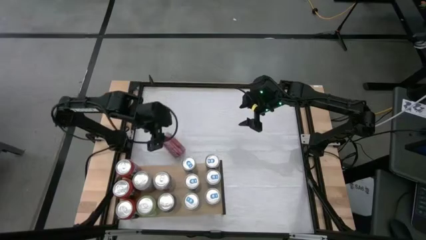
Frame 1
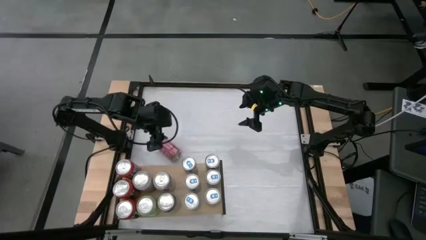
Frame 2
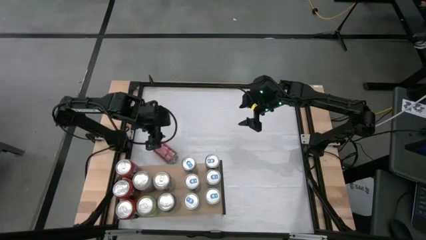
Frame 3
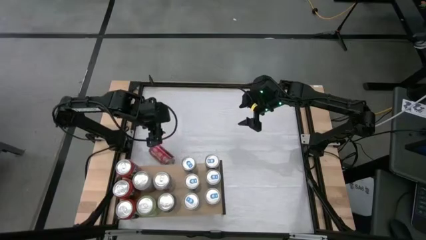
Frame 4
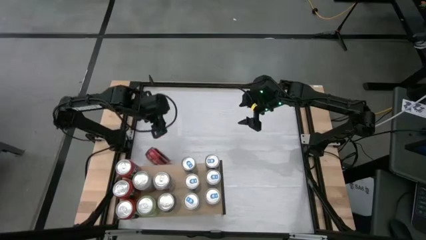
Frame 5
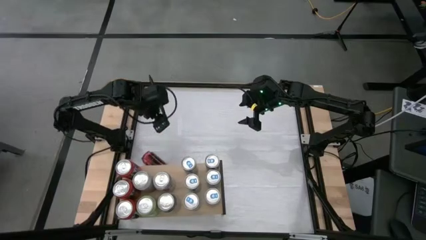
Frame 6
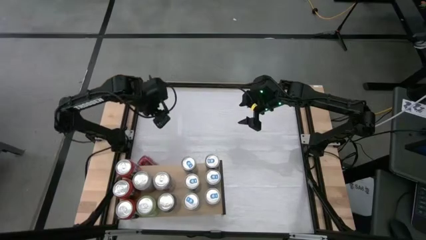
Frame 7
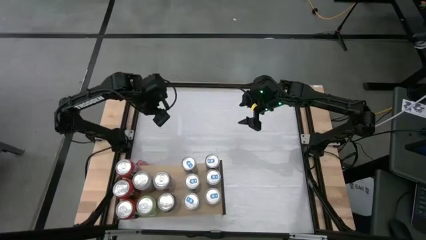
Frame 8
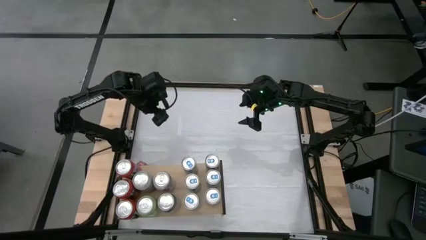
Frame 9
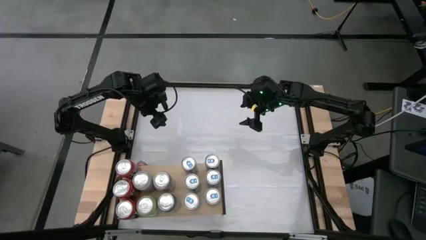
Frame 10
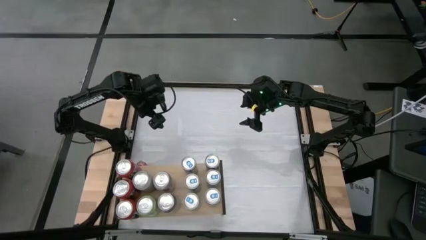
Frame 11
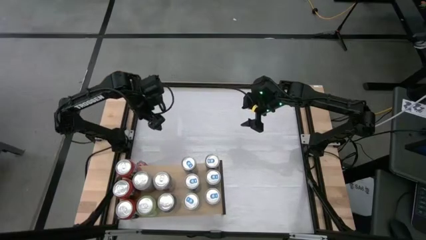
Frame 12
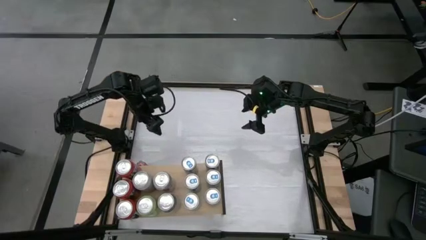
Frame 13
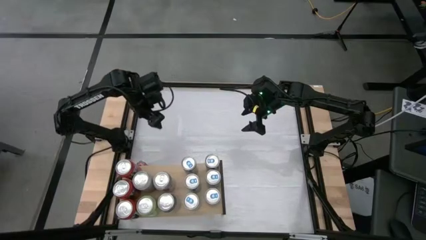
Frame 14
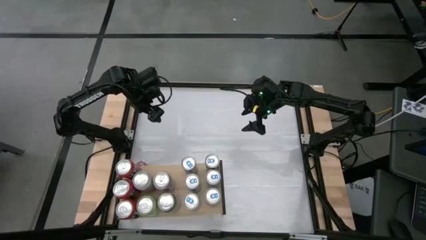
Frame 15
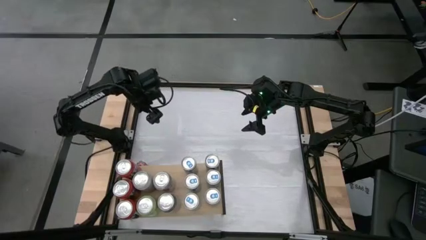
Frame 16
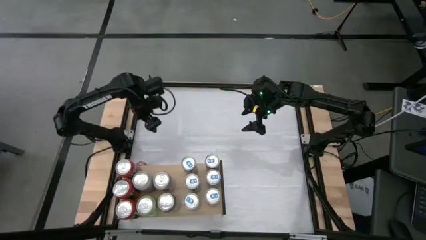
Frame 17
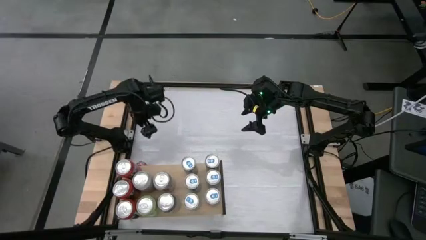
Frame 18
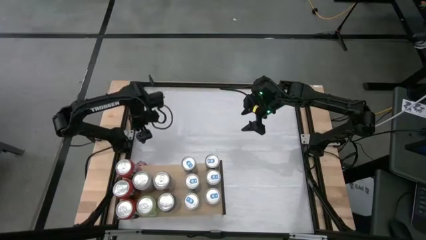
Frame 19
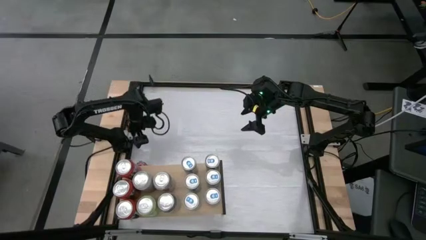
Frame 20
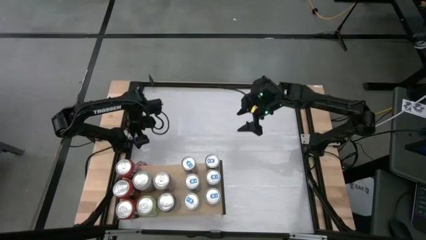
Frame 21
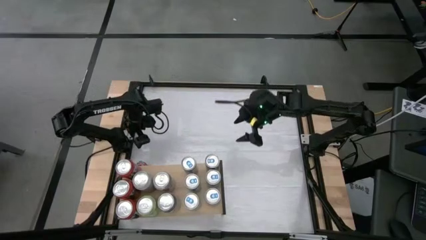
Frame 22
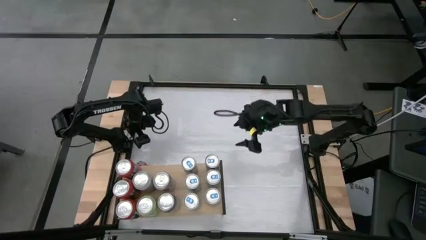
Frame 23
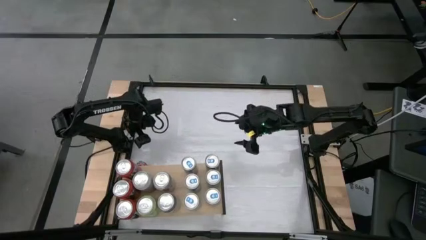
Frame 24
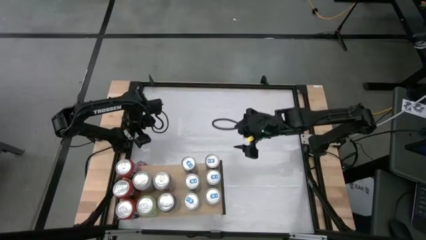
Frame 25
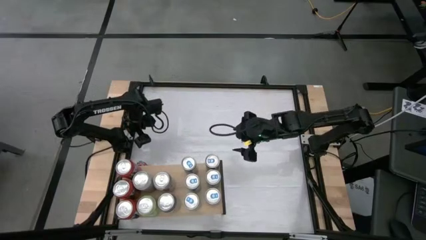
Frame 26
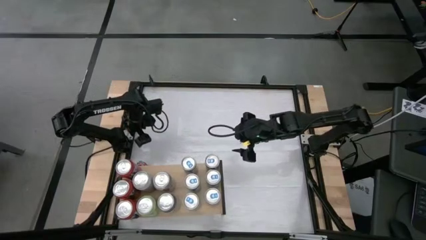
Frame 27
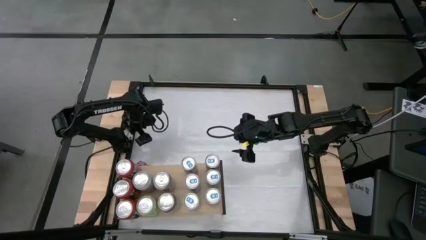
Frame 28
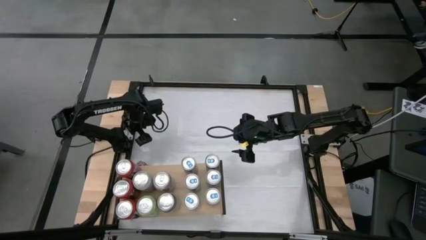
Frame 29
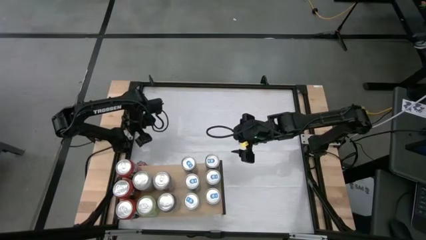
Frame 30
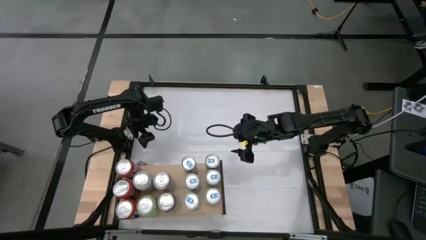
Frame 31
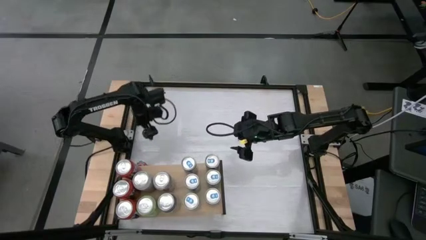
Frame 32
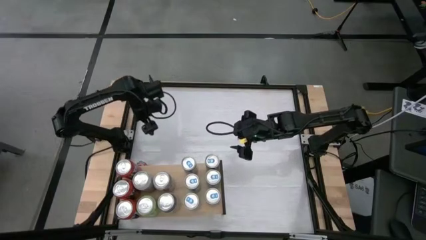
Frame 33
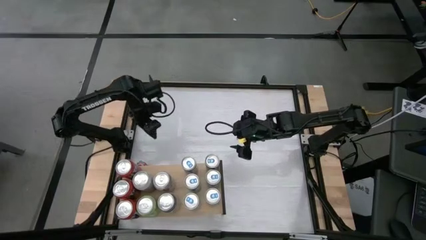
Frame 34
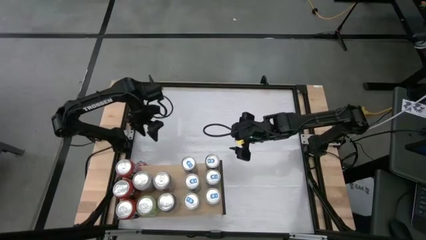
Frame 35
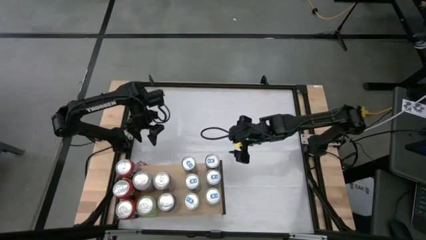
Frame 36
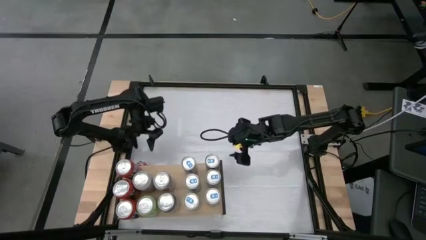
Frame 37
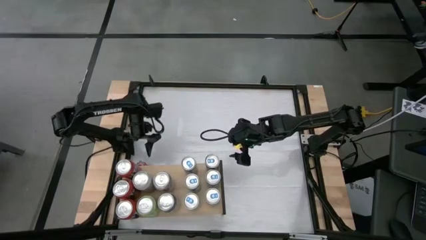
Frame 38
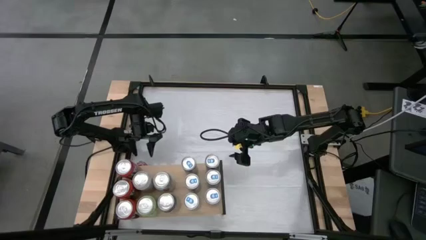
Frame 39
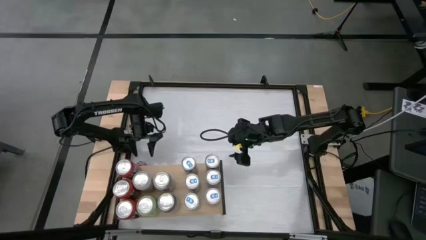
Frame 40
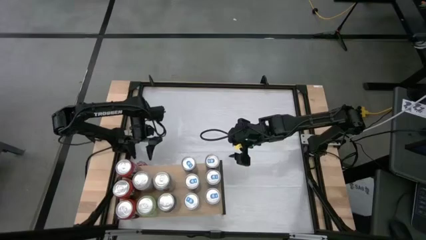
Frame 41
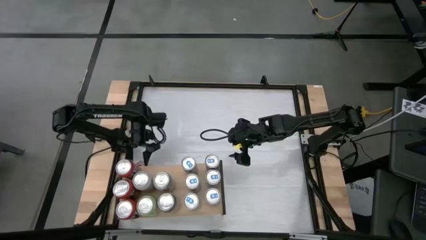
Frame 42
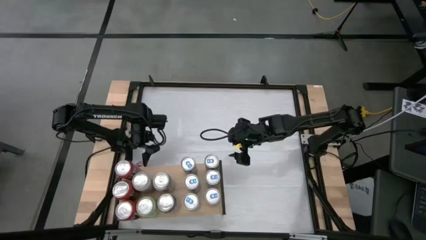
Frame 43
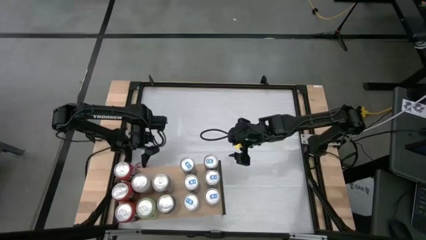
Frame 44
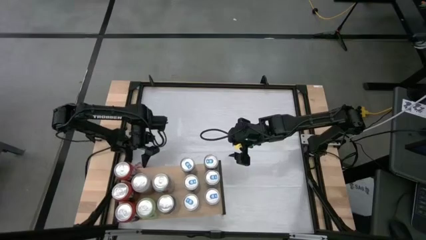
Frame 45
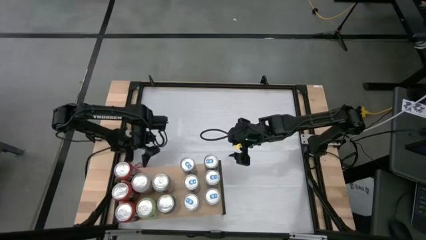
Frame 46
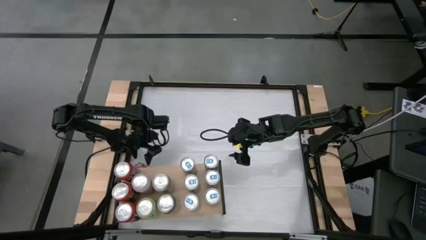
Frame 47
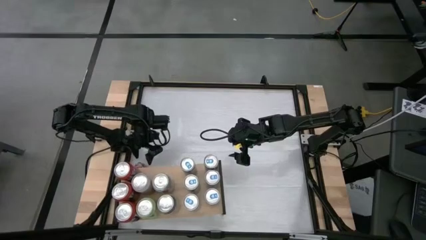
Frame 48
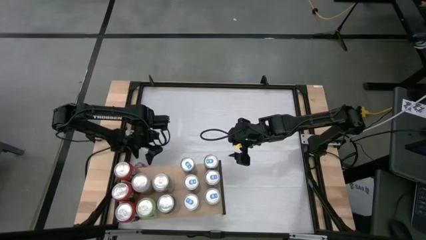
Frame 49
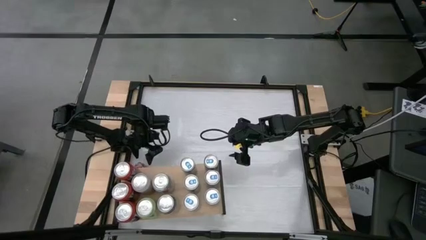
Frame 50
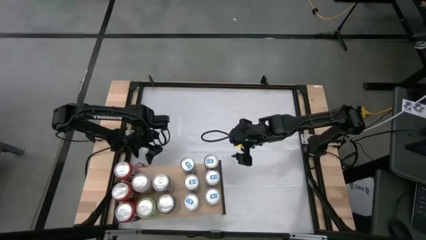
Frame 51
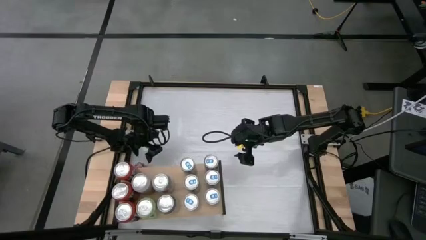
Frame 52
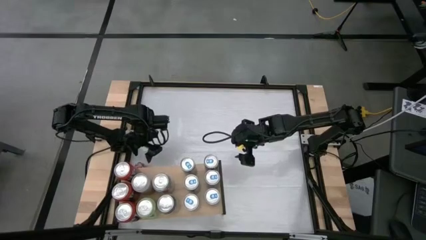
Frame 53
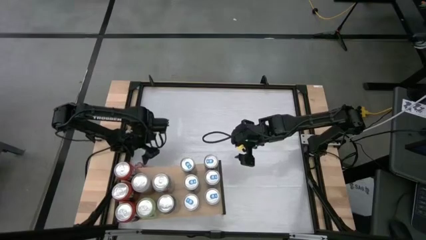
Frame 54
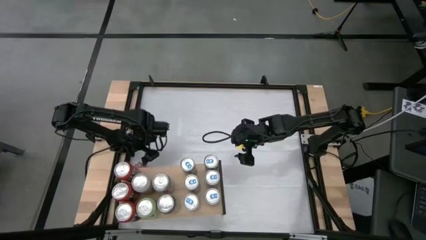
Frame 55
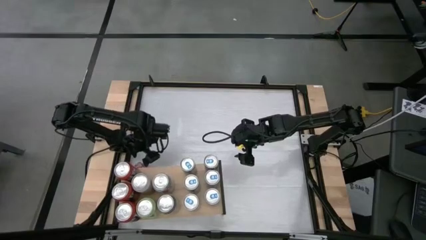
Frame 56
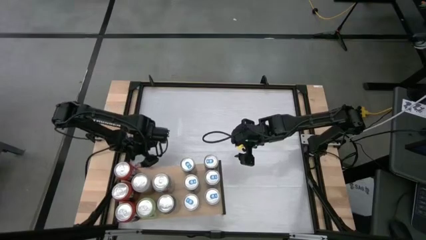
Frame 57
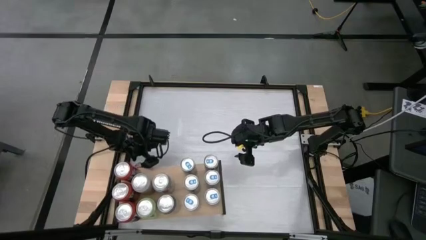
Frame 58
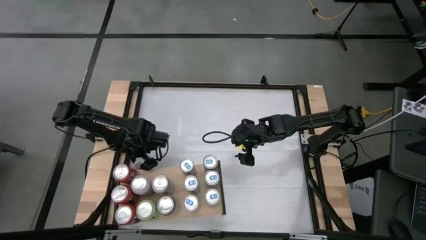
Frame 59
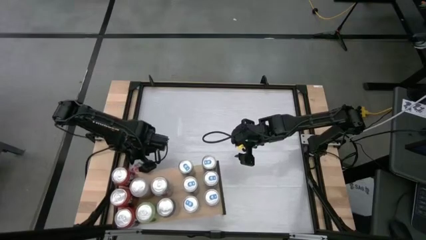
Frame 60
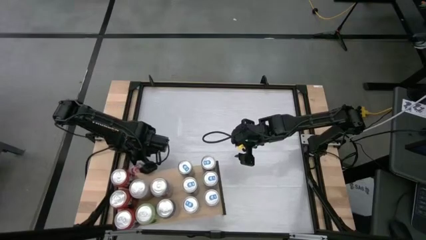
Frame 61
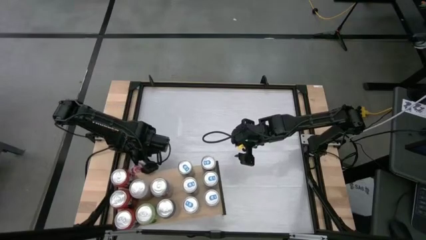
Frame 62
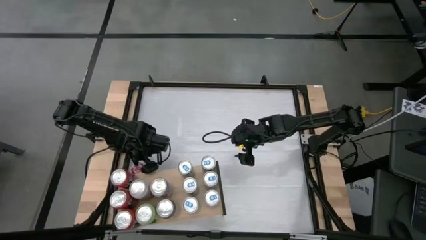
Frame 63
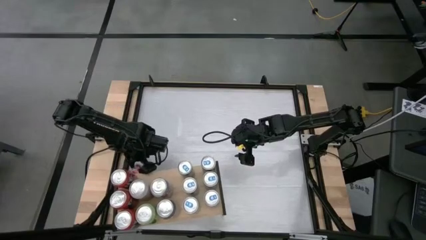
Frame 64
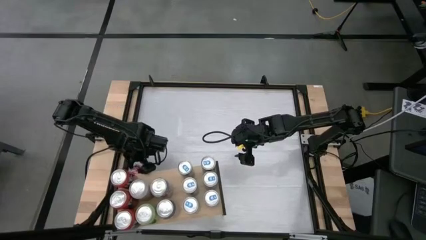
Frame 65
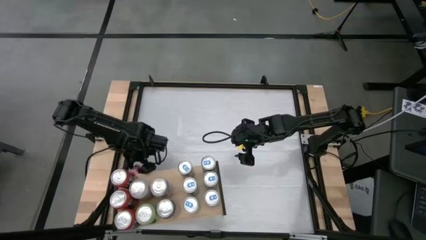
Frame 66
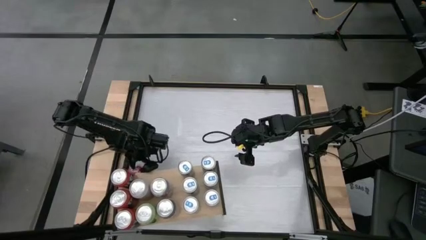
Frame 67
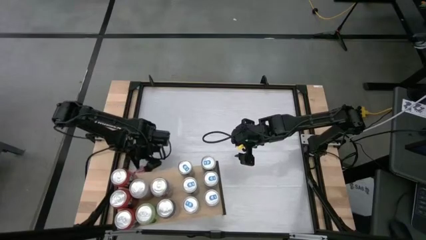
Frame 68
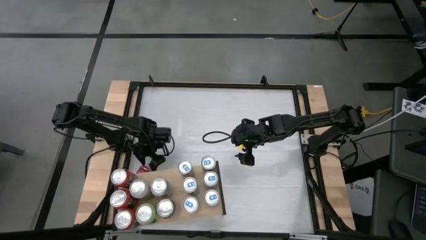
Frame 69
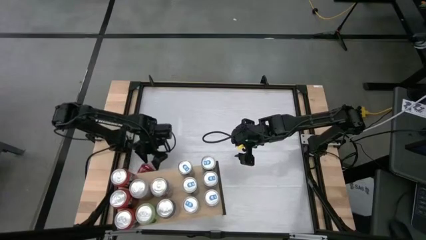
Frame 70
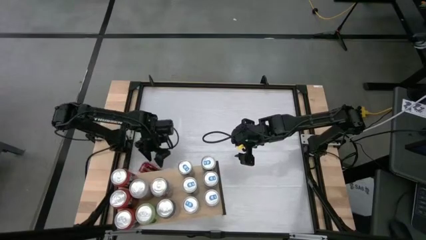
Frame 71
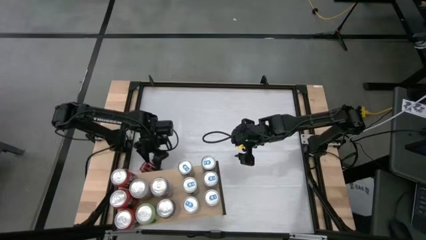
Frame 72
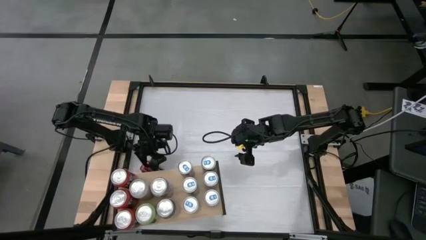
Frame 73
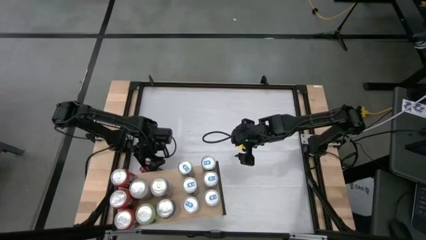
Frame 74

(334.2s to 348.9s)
Task: Place canned beverage on shelf
Put the red soda can on the shelf aligned with the silver soda cans

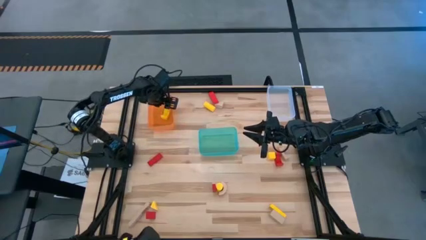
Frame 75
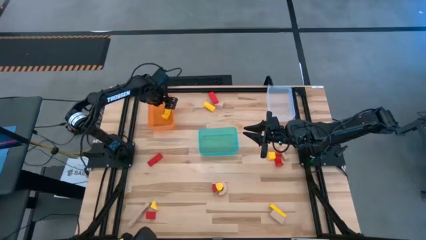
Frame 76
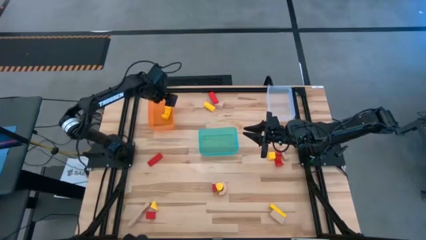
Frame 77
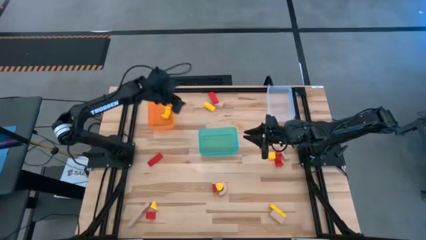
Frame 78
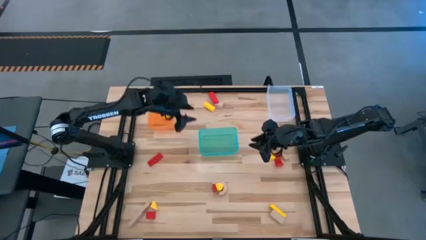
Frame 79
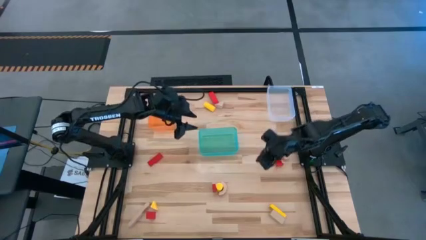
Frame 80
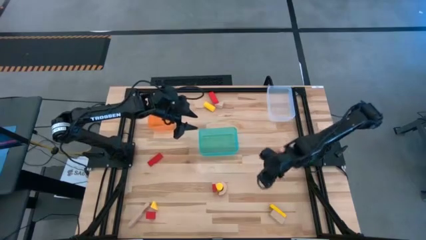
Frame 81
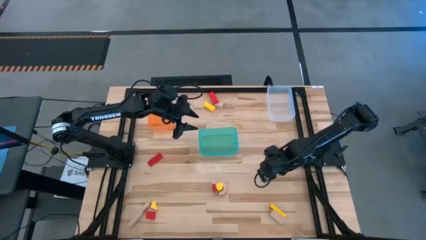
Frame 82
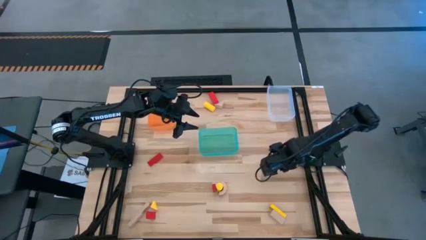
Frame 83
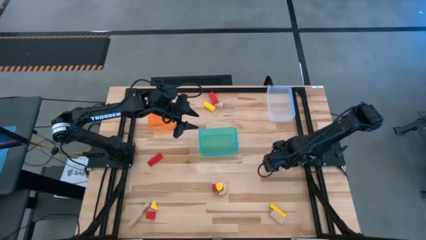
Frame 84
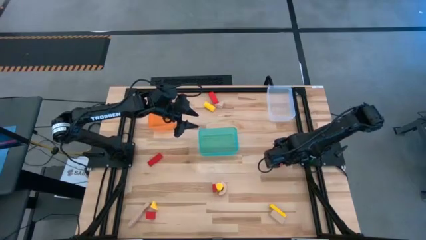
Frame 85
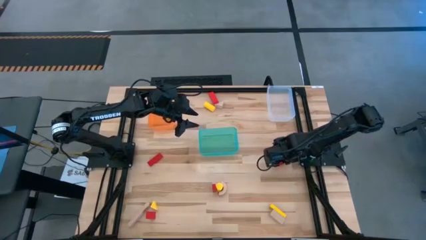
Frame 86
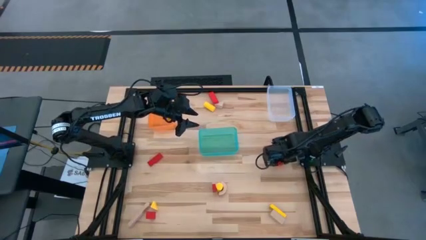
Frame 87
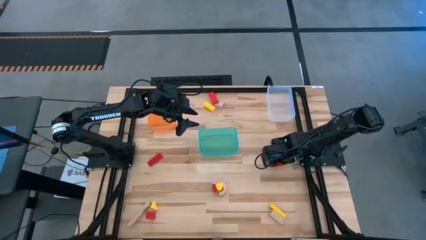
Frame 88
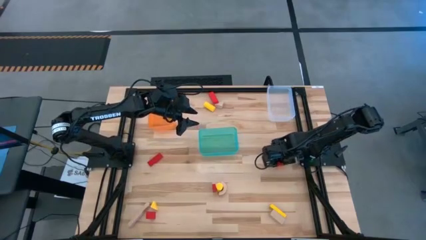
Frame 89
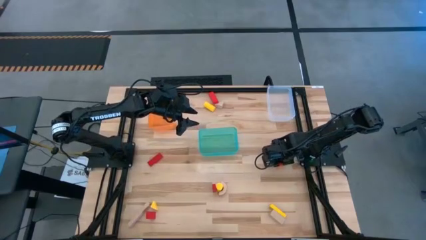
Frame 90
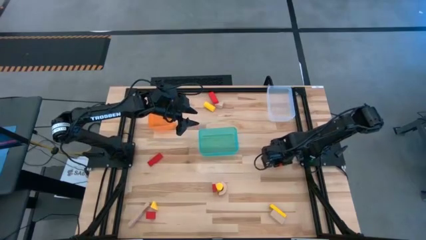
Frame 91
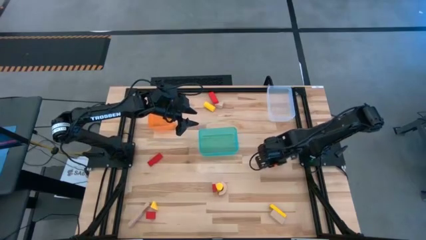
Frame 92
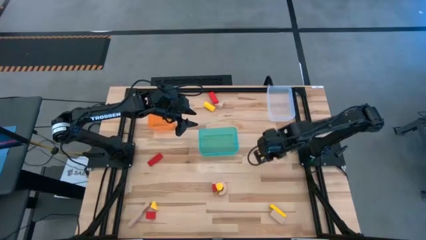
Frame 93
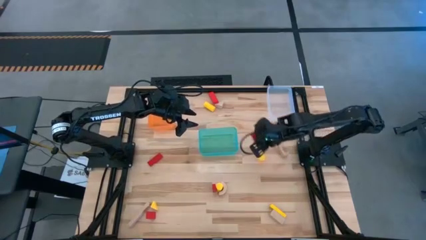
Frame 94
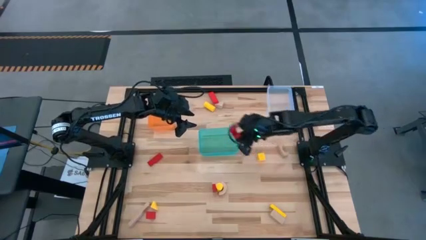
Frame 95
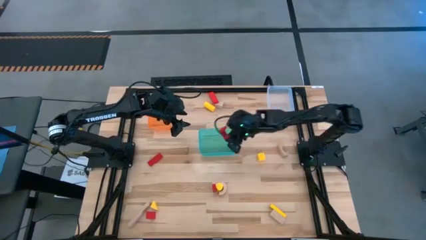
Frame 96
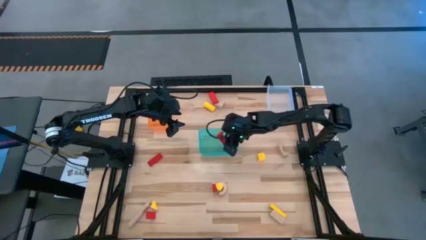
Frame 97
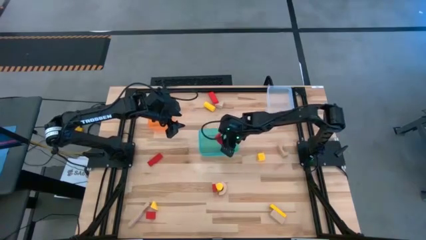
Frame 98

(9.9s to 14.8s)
Task: Sort & place blocks by color
Put the red block into the blue bin
